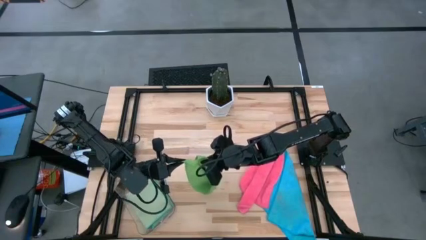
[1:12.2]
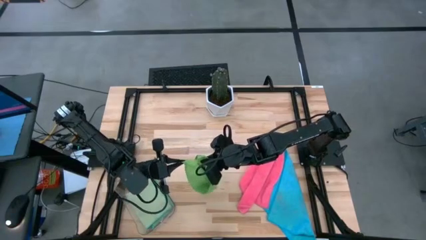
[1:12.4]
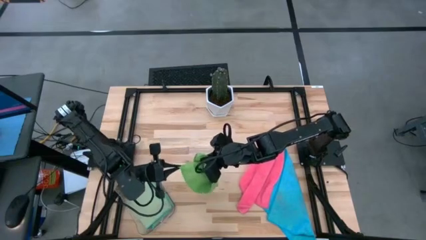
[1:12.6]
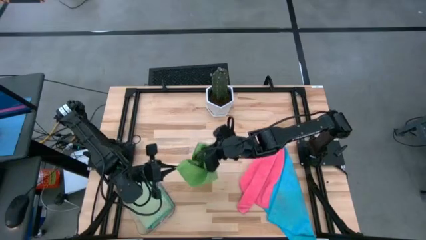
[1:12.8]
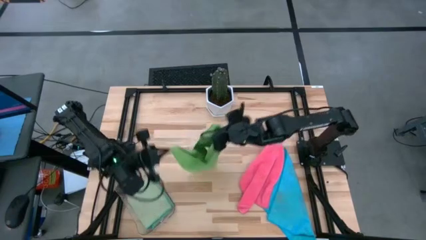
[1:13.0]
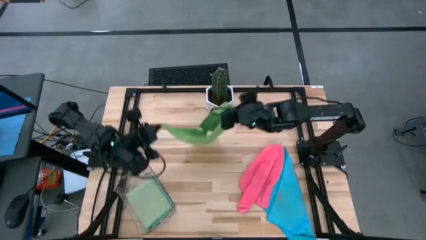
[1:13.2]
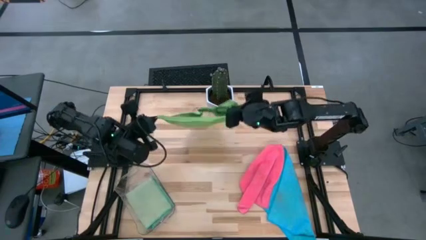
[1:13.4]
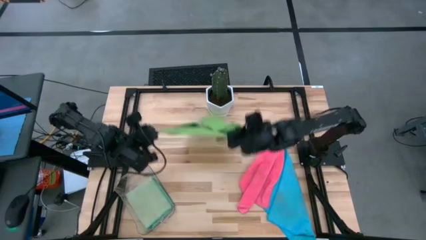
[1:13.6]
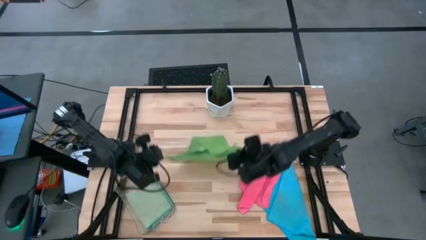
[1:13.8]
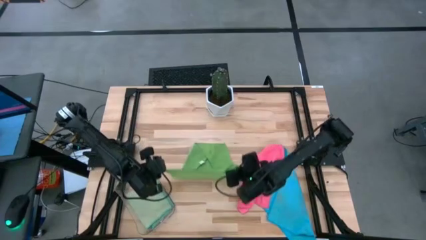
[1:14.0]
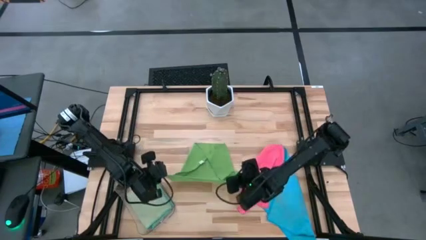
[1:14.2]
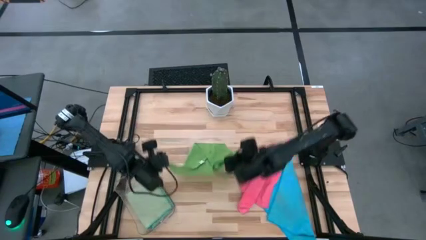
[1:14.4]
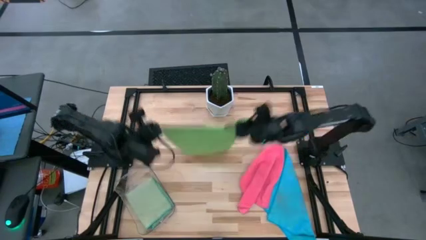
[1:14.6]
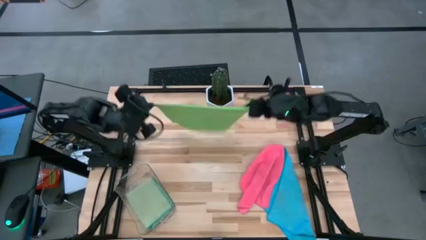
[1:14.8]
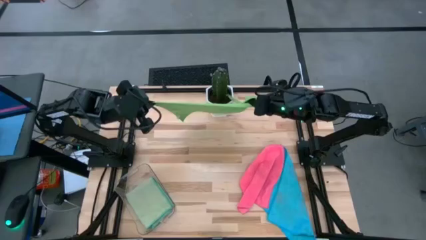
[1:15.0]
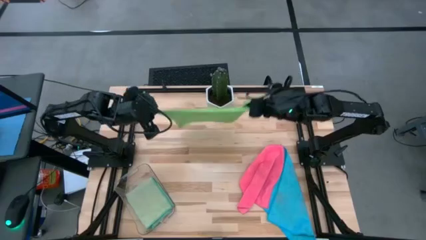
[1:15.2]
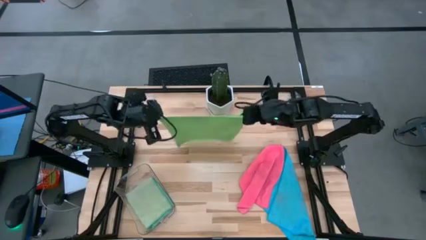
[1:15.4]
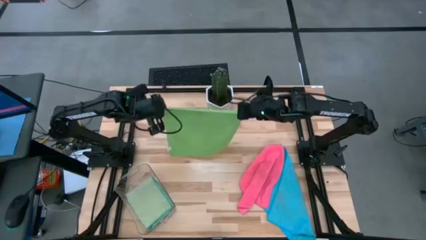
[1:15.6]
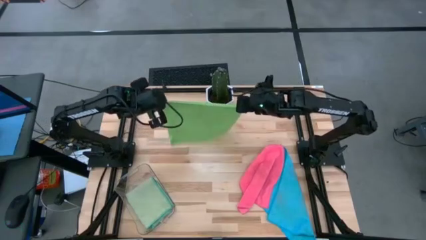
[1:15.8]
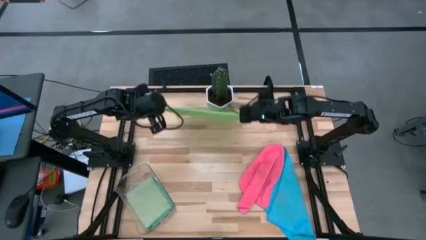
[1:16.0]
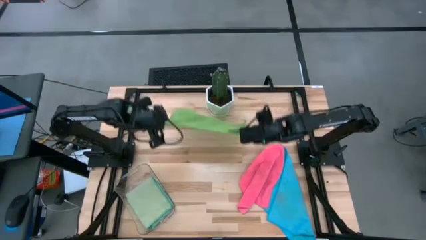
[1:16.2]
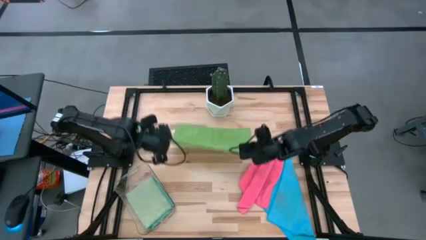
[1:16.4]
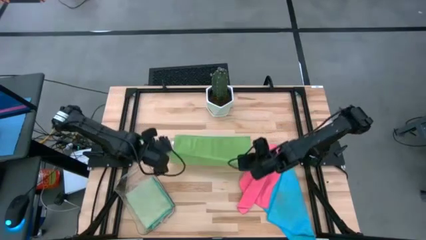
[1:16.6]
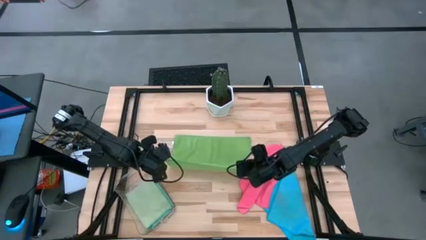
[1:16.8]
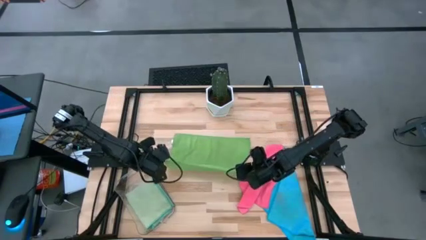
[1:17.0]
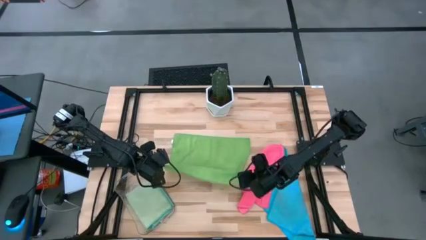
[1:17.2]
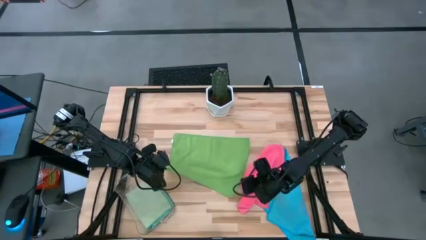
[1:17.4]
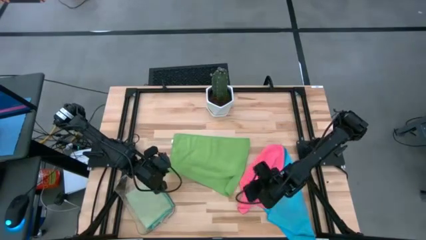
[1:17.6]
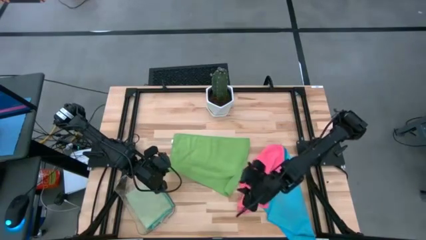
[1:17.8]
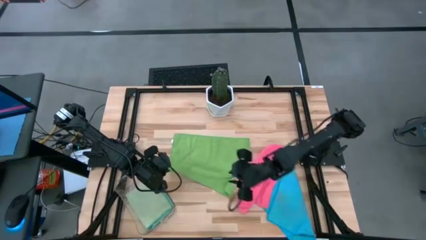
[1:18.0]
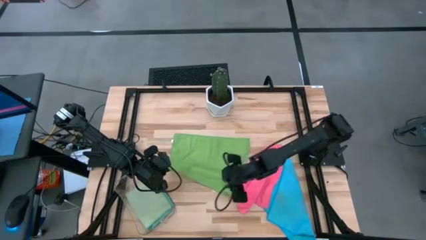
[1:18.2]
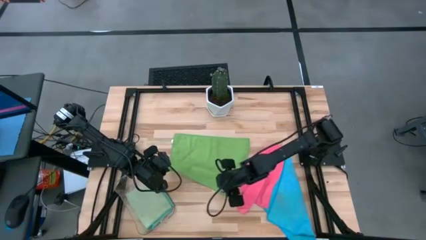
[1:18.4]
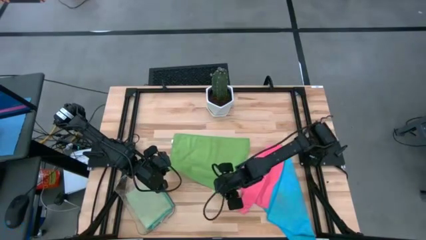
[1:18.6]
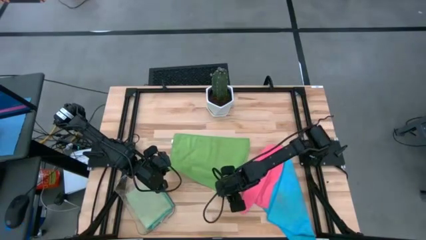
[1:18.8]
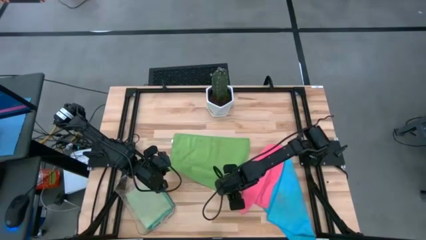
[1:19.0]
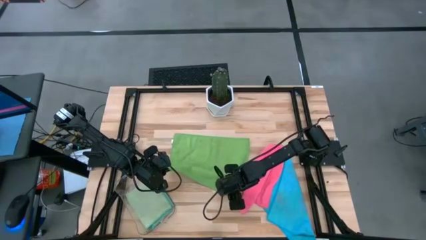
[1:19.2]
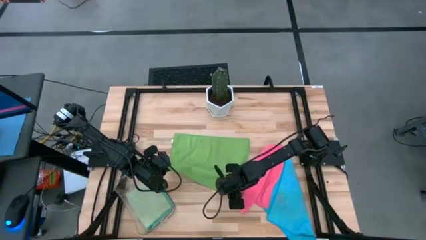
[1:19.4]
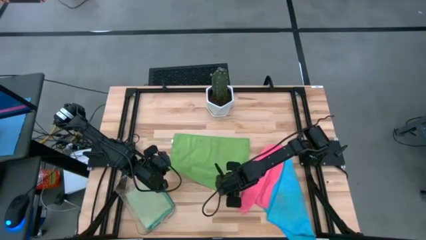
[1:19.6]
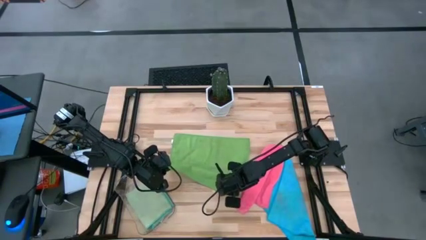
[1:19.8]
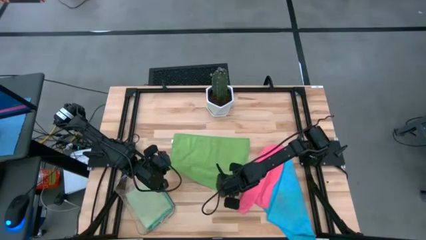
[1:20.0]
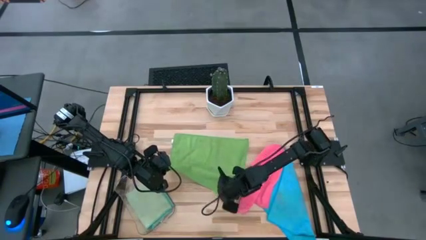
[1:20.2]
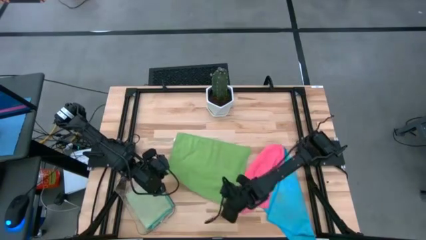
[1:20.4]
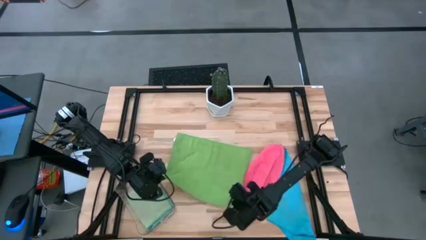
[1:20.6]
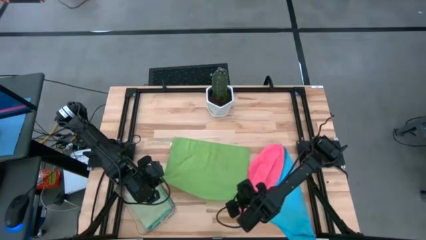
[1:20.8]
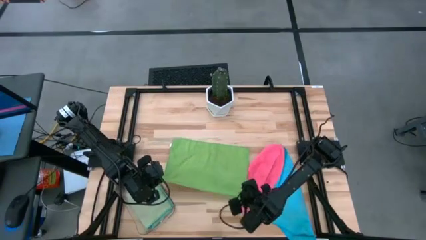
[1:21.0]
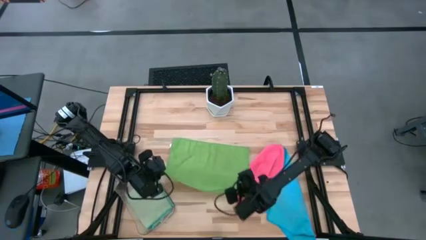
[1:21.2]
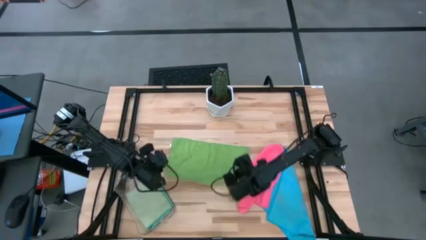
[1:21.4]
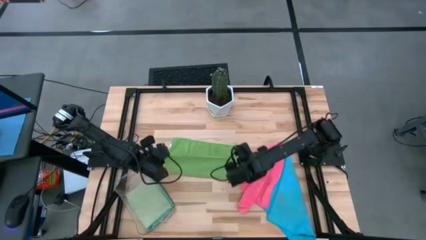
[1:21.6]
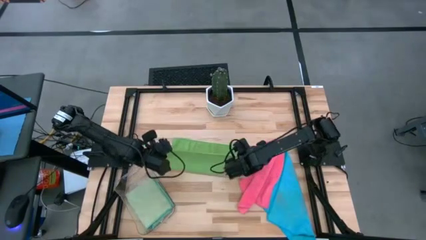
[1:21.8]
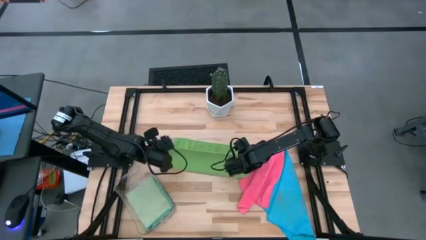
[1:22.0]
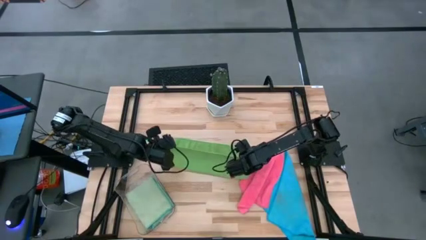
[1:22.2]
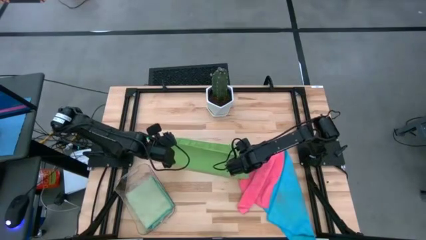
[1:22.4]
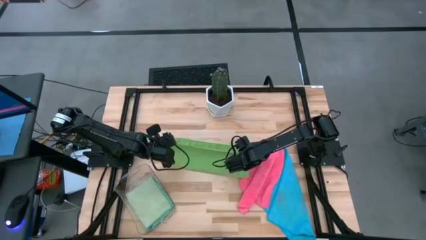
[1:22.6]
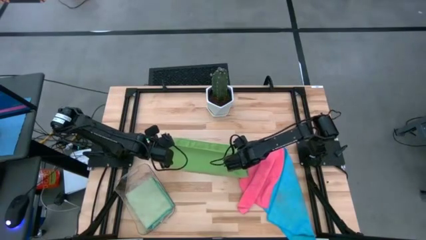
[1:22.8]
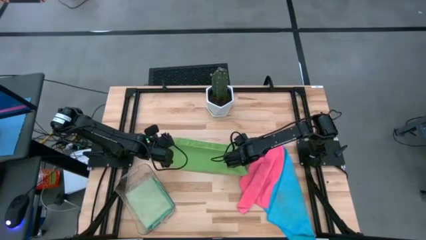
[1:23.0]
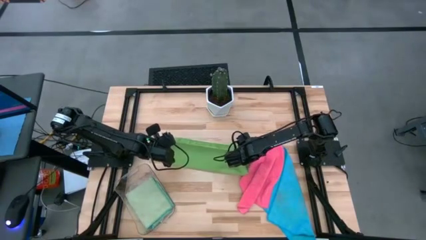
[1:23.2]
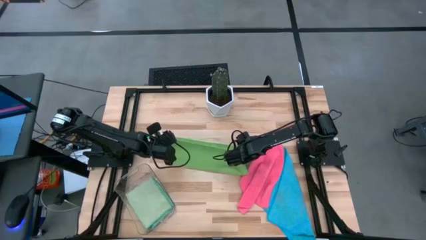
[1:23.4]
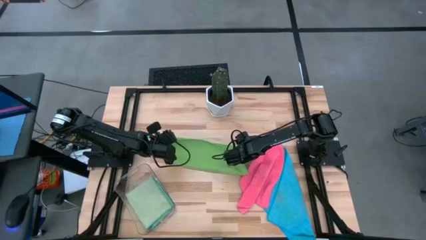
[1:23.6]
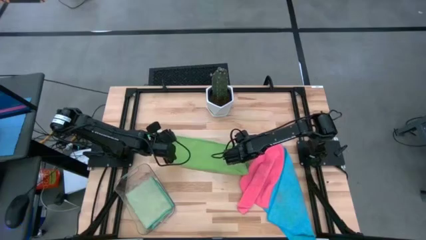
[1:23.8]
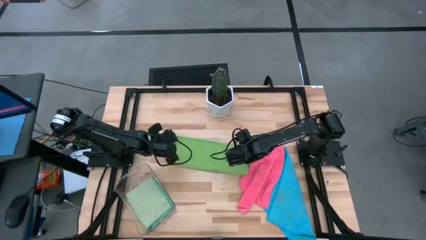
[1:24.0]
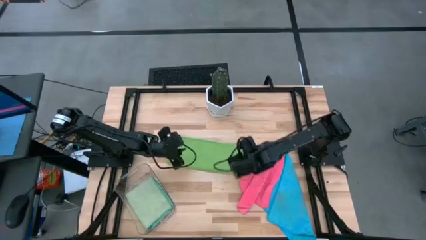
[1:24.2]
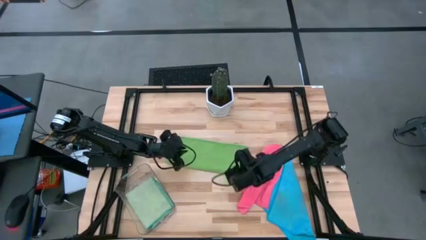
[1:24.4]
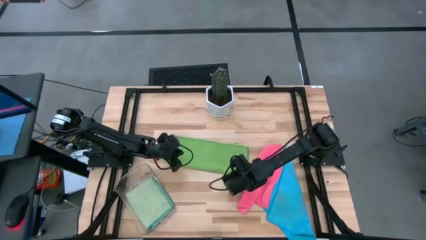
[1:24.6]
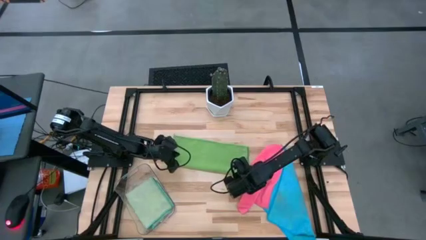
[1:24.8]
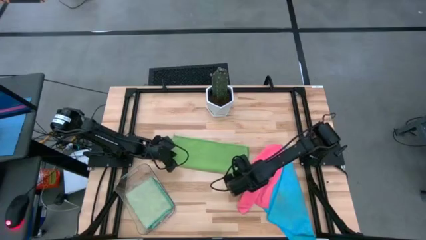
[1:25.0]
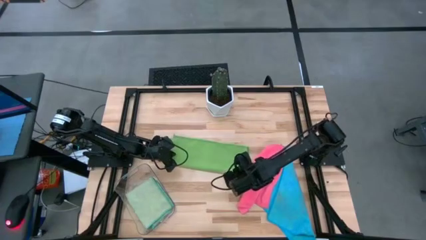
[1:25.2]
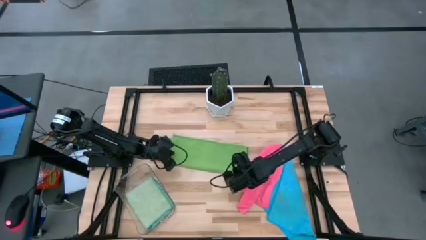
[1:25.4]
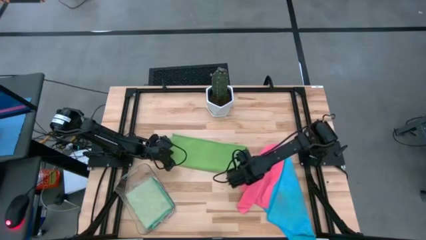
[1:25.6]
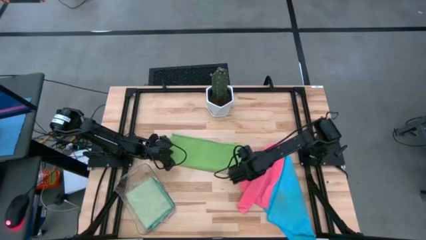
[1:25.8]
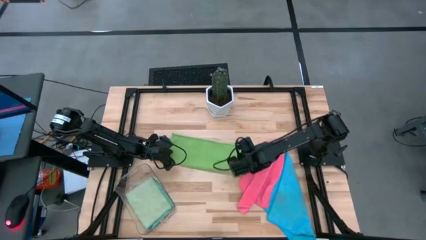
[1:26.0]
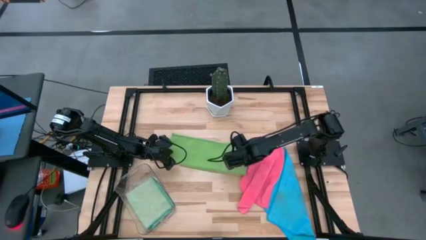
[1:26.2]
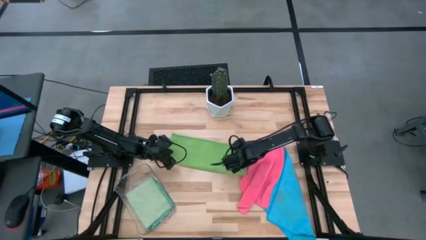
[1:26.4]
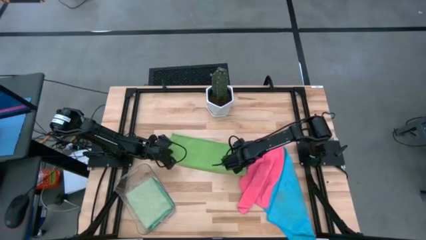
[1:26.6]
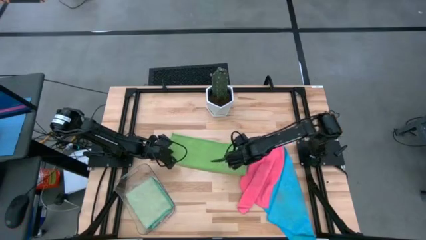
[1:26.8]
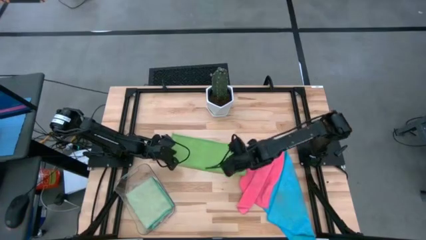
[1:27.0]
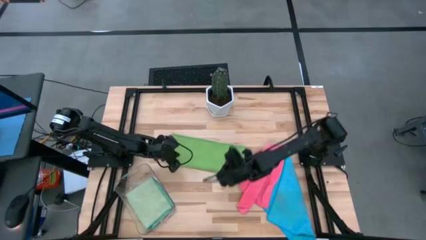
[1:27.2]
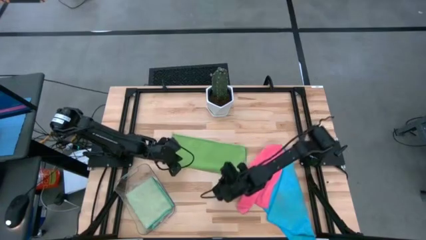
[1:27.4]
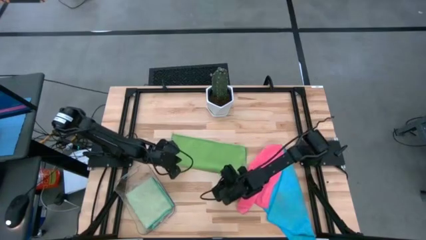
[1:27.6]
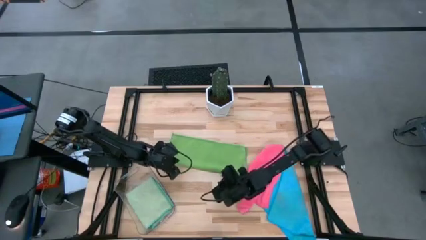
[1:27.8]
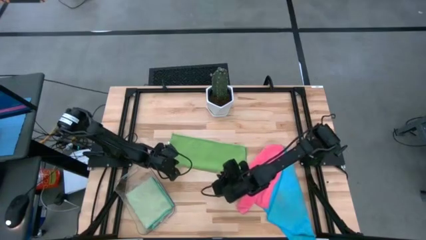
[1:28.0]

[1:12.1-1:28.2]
Task: Fold microfiber towels
Fold the green microfiber cloth
